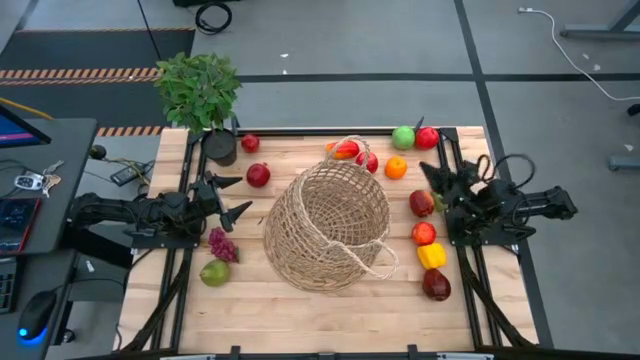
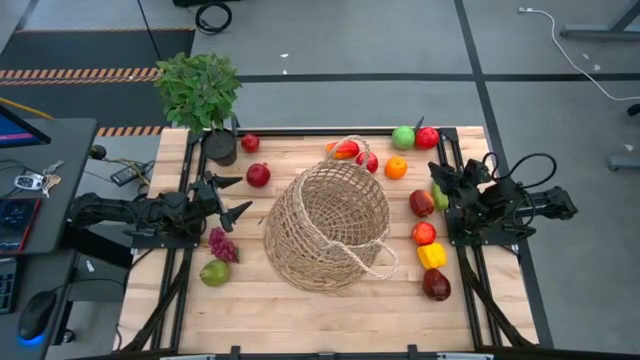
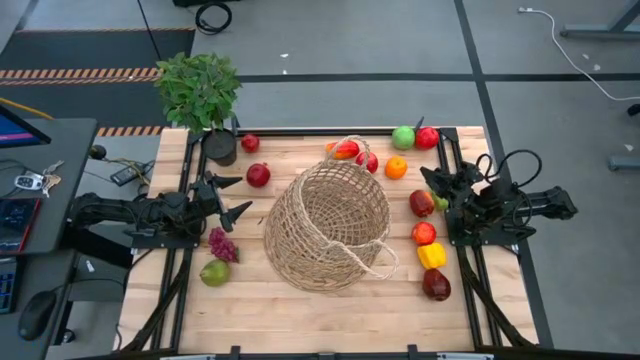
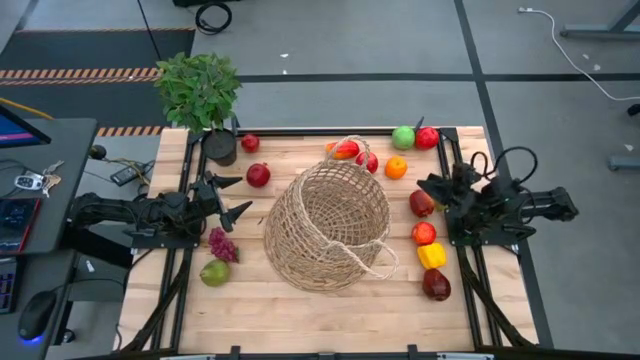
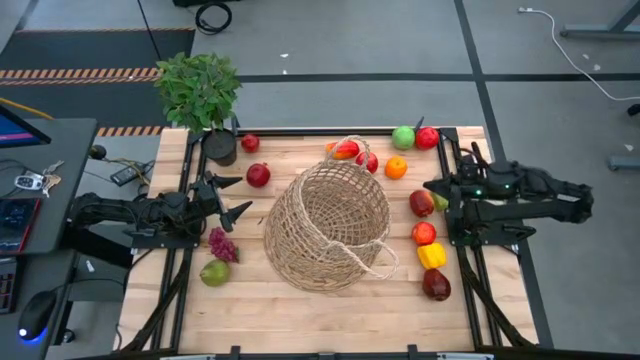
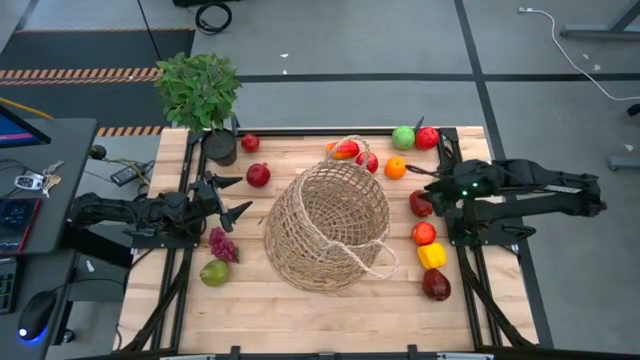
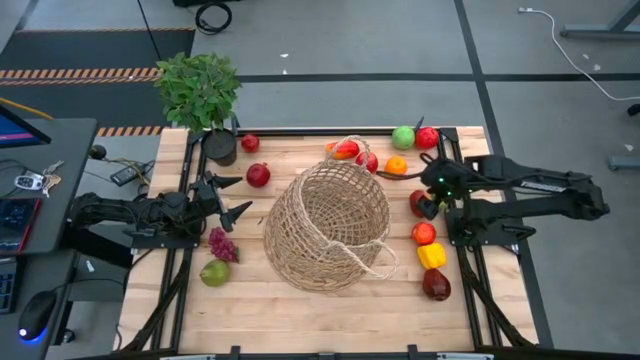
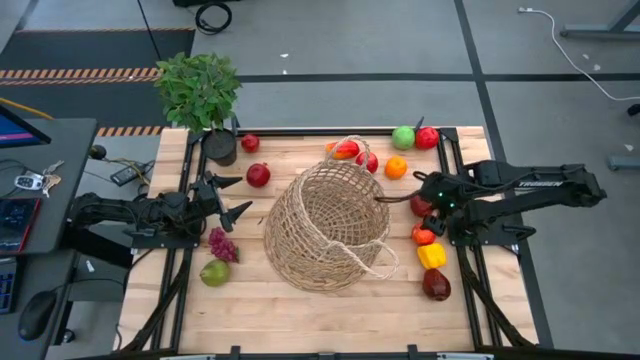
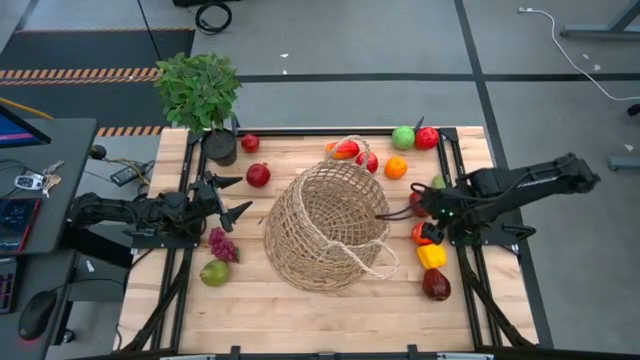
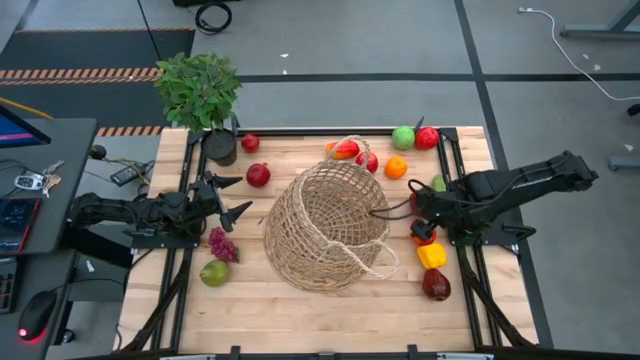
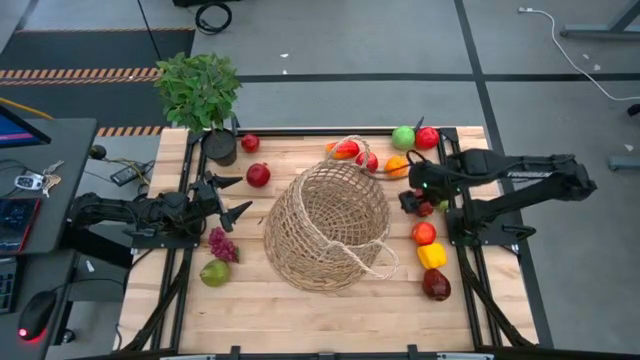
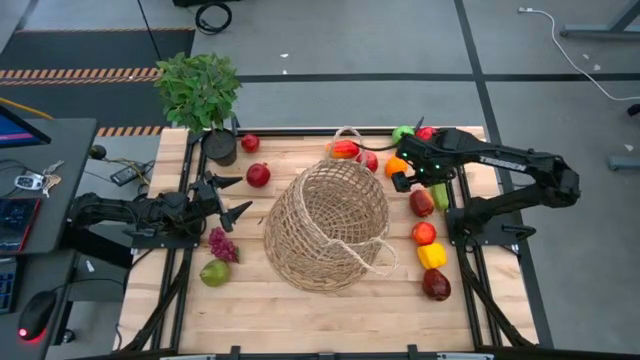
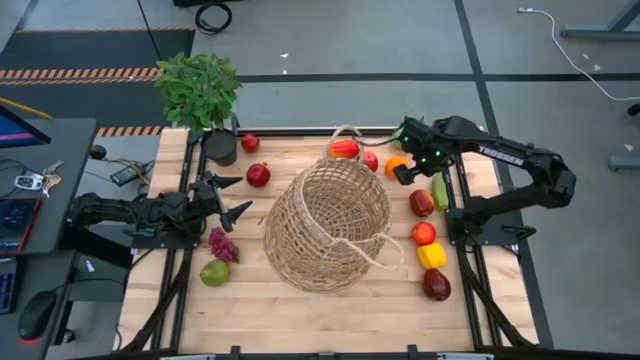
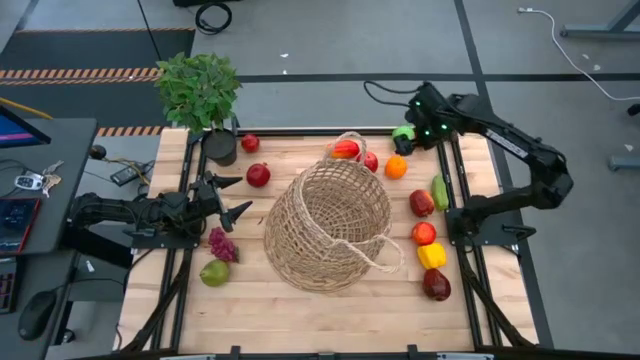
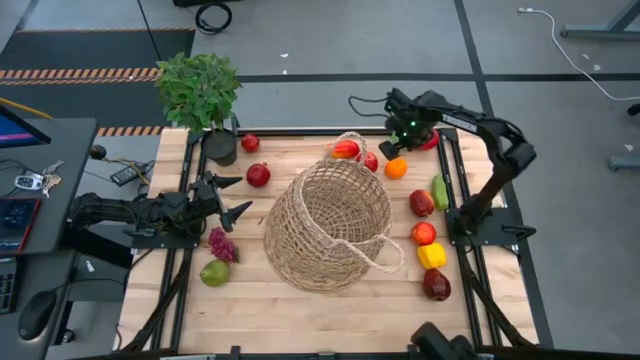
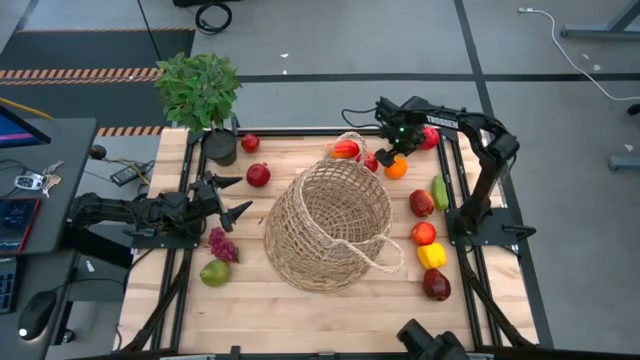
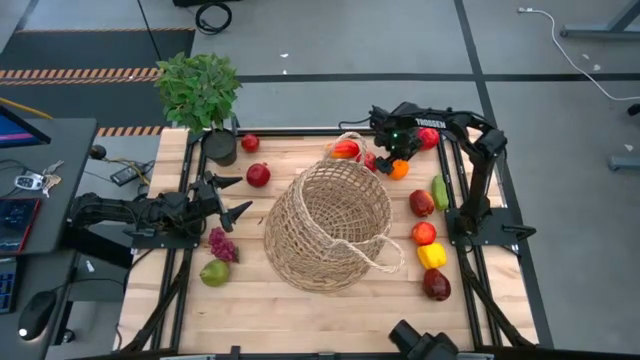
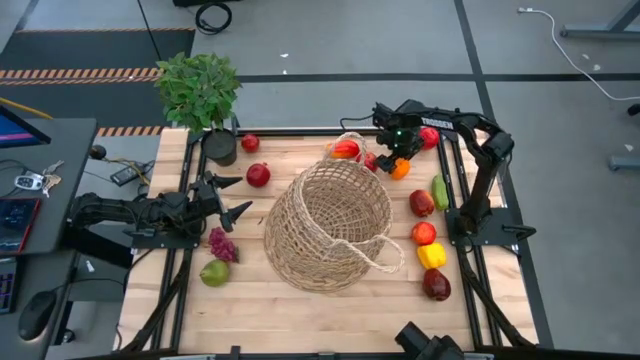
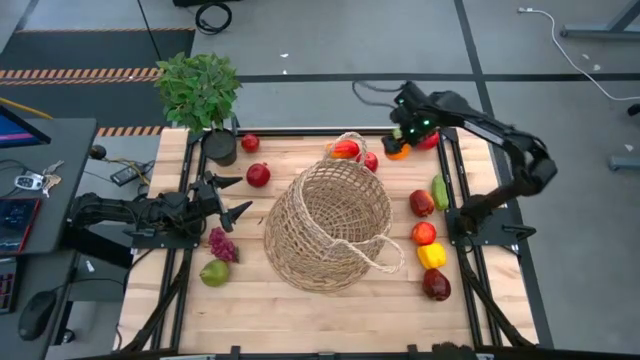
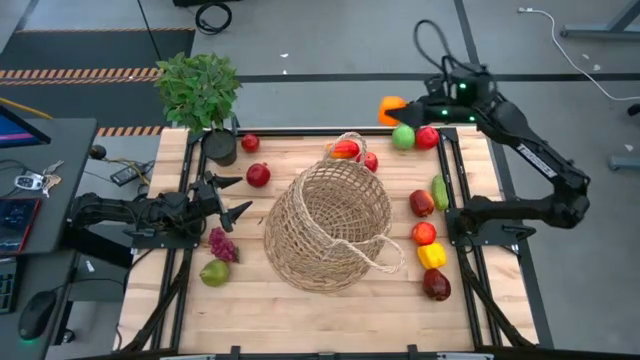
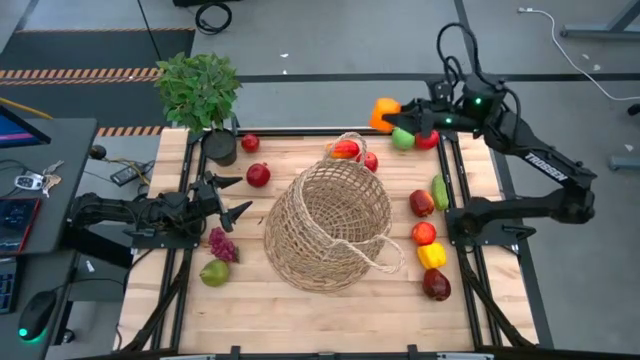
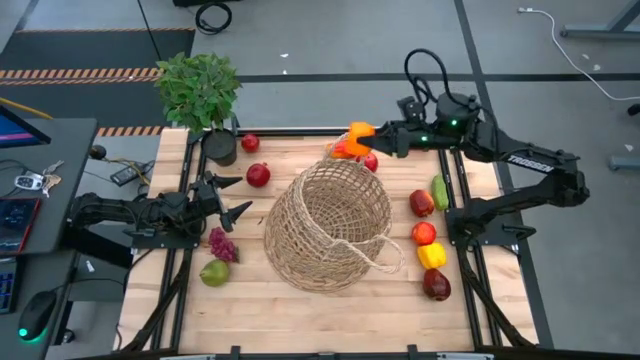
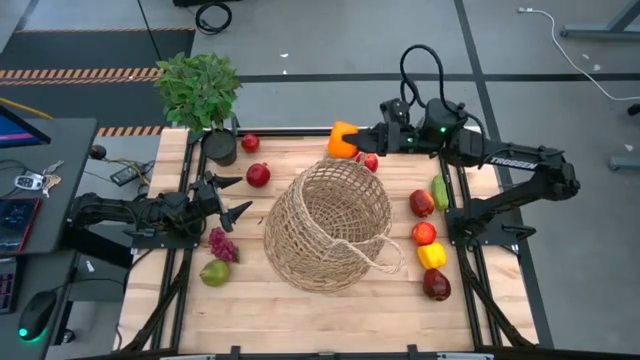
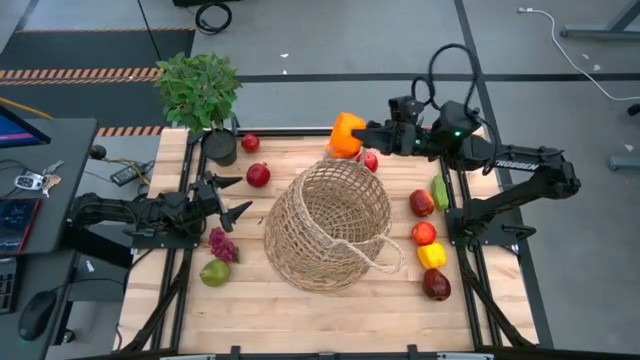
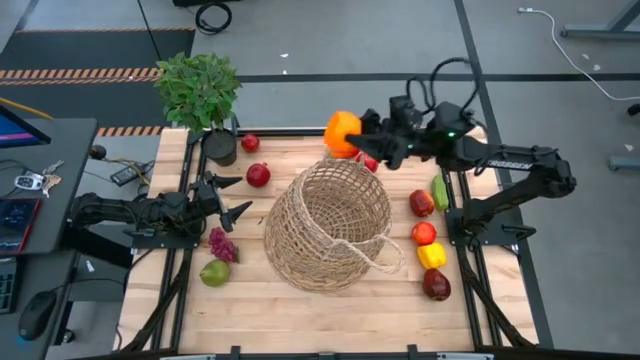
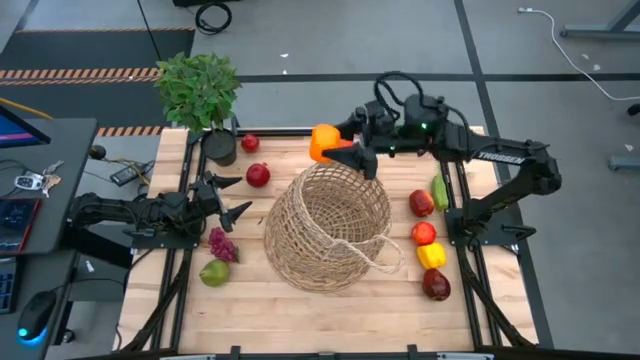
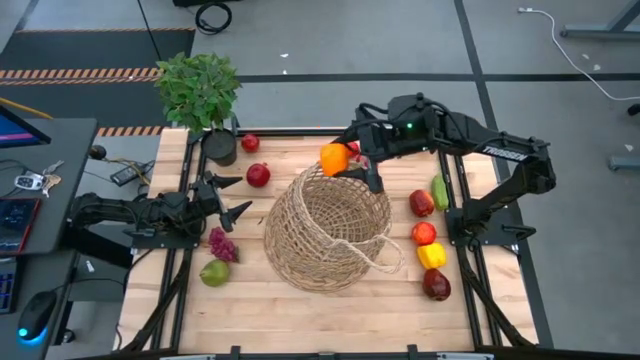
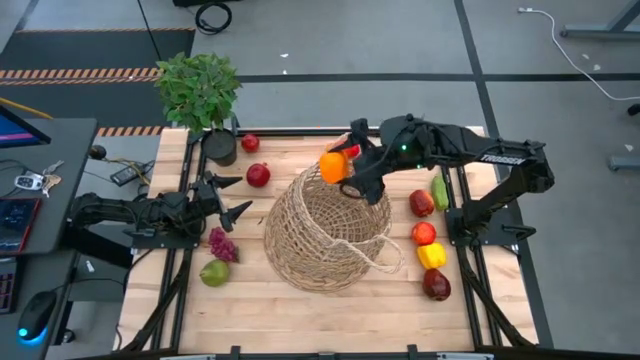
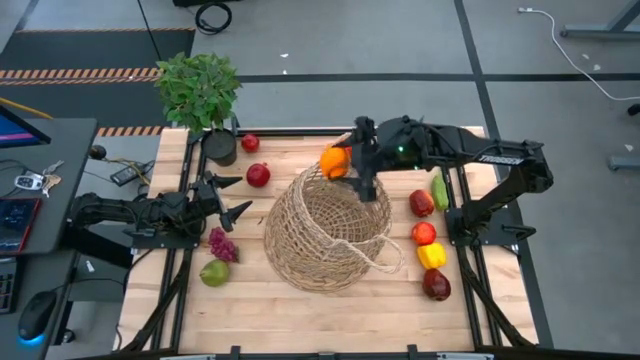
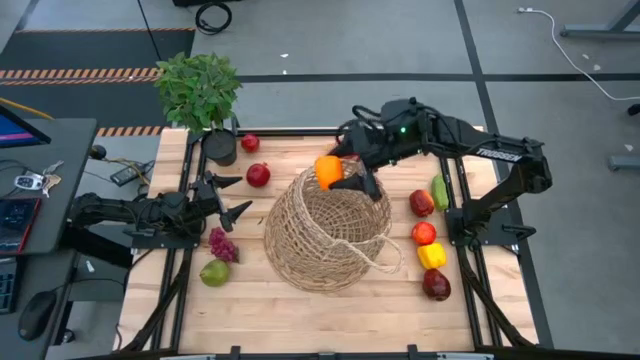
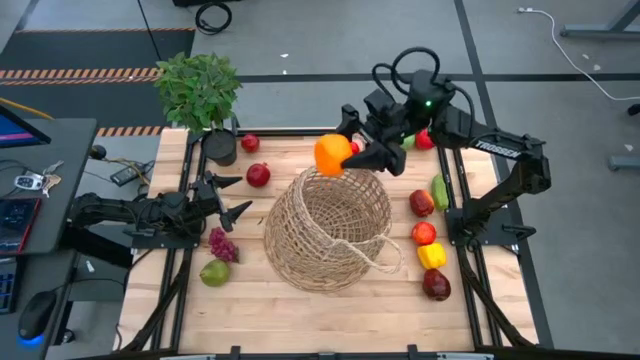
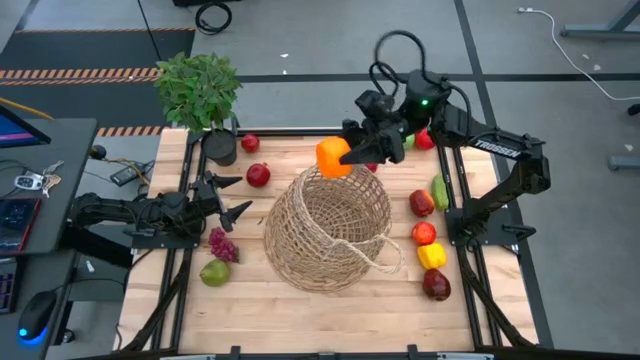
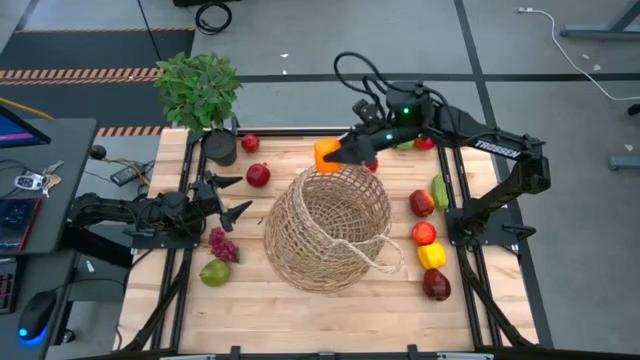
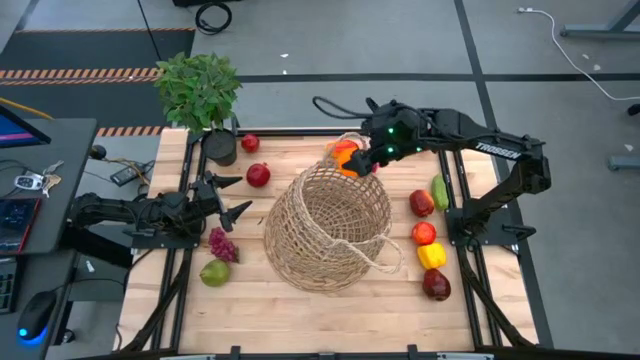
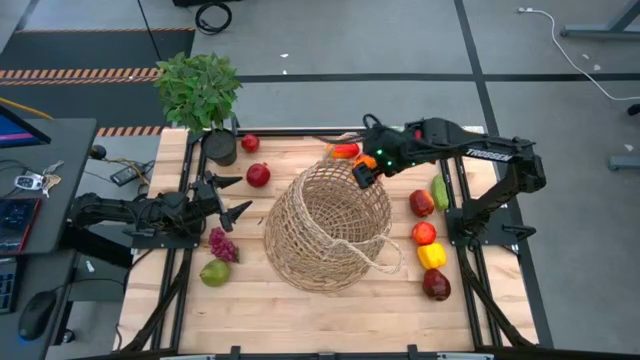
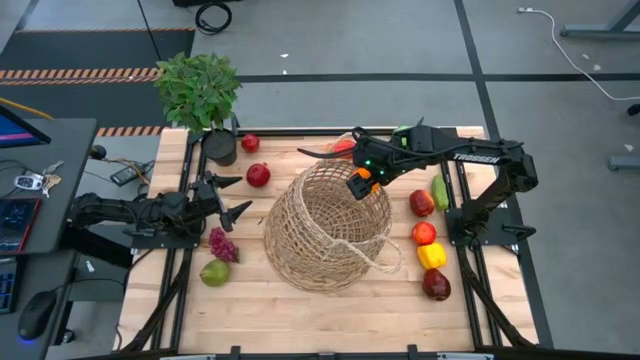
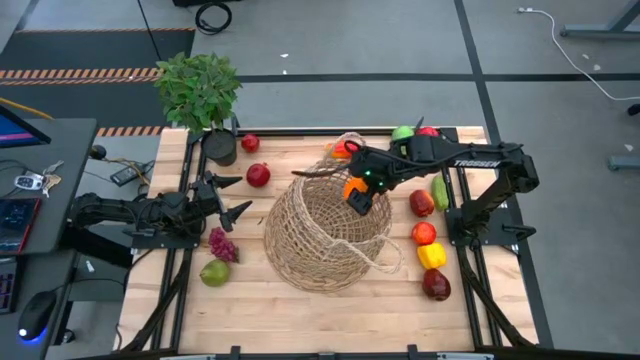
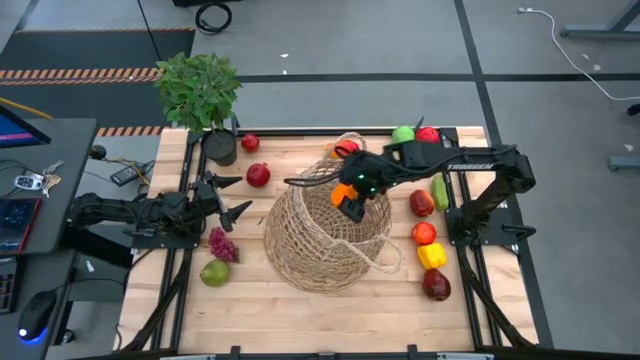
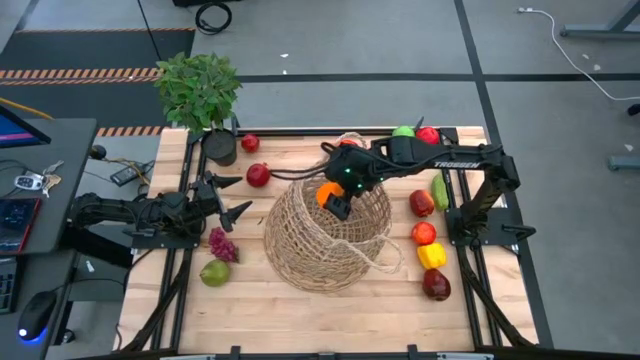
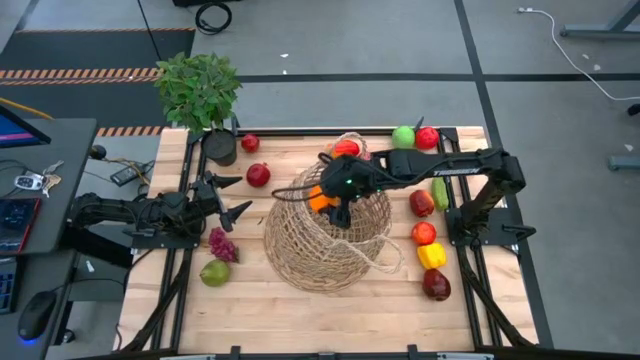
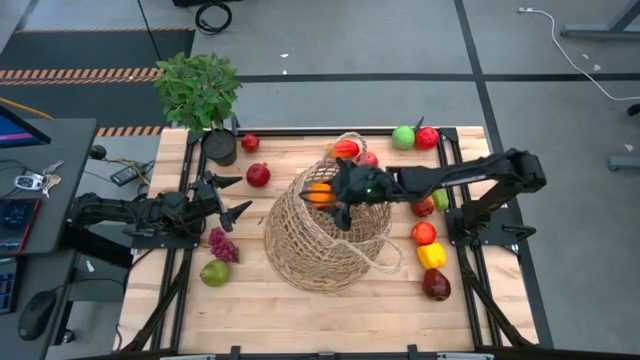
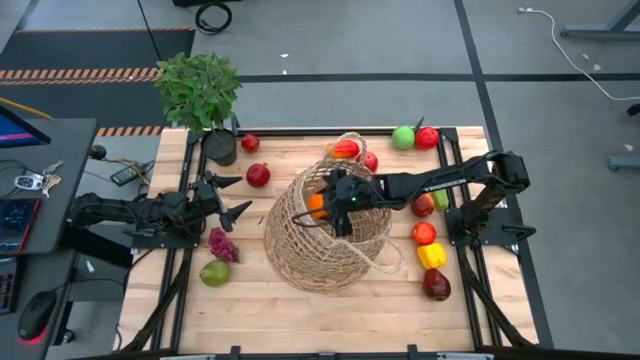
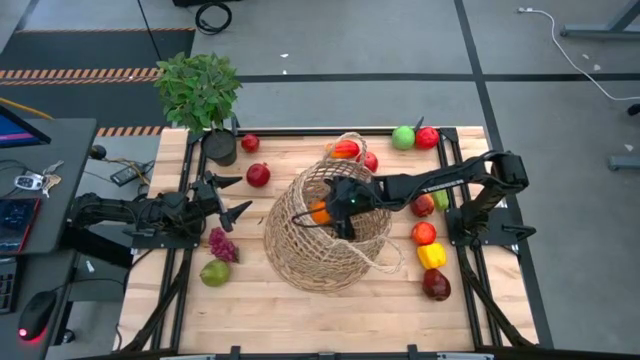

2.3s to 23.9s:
Task: Build produce basket
Put the orange into the brown basket
